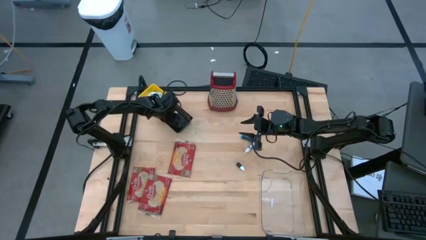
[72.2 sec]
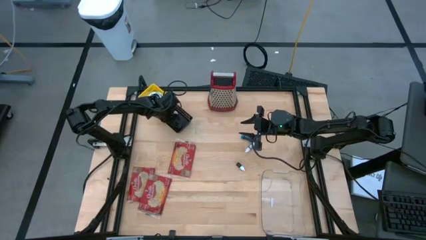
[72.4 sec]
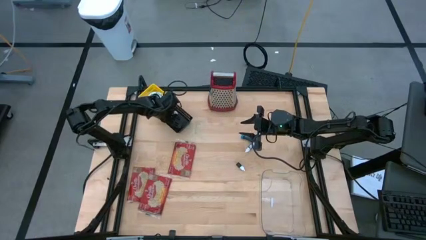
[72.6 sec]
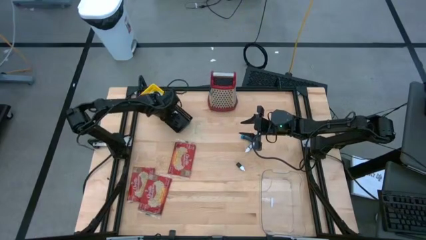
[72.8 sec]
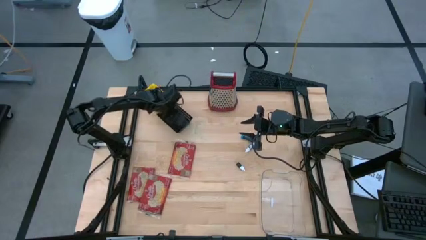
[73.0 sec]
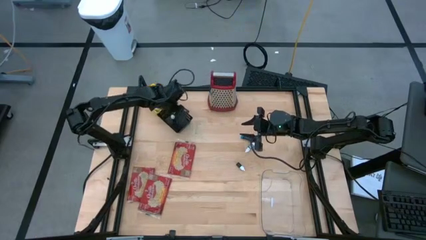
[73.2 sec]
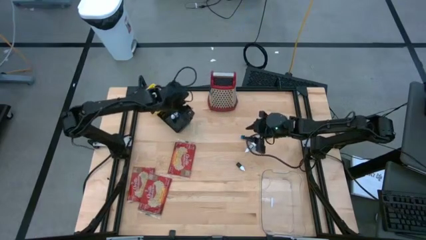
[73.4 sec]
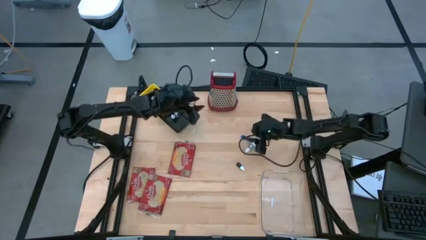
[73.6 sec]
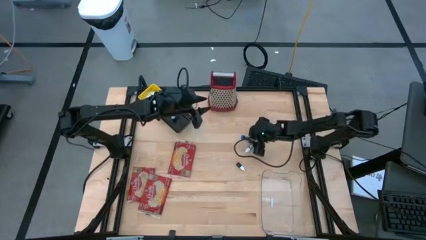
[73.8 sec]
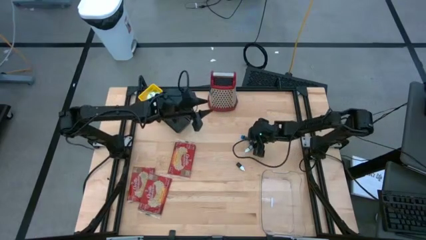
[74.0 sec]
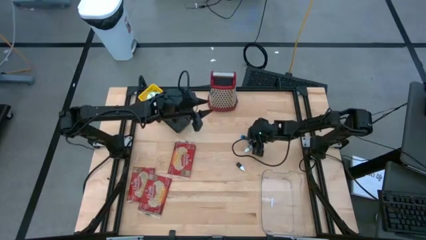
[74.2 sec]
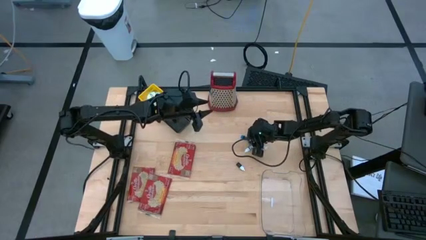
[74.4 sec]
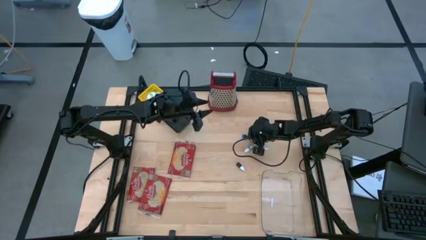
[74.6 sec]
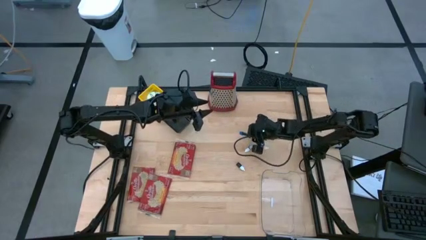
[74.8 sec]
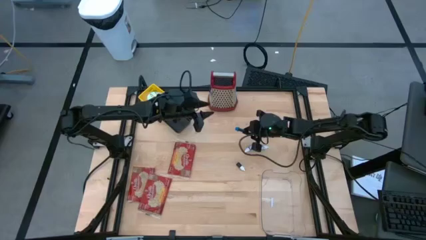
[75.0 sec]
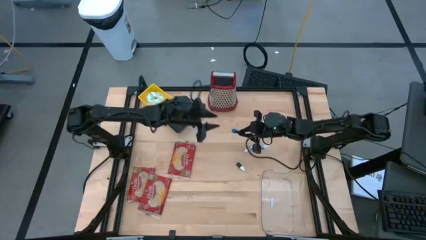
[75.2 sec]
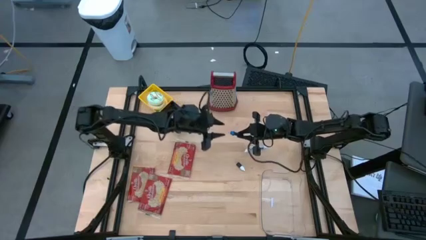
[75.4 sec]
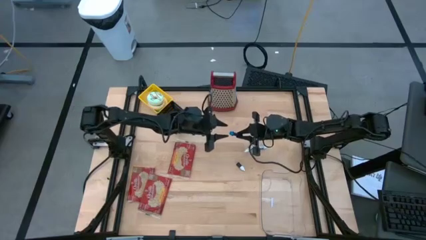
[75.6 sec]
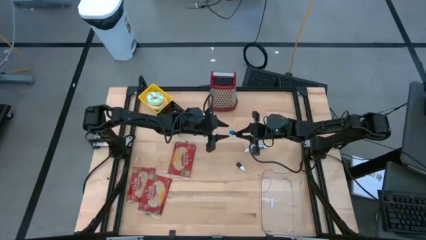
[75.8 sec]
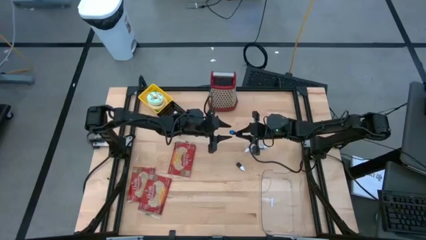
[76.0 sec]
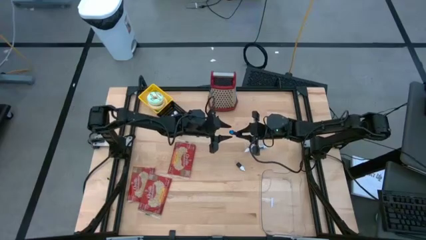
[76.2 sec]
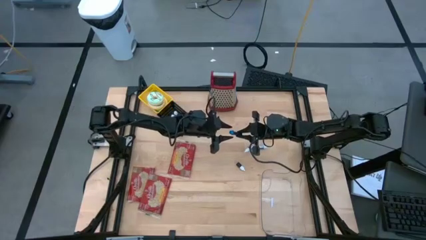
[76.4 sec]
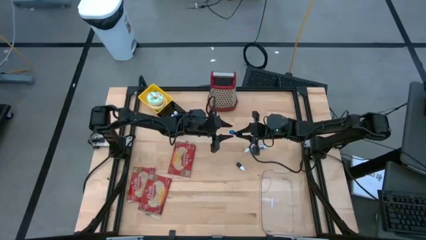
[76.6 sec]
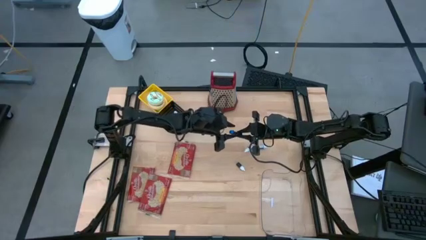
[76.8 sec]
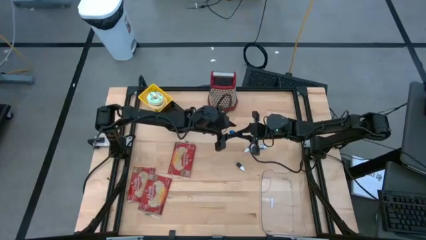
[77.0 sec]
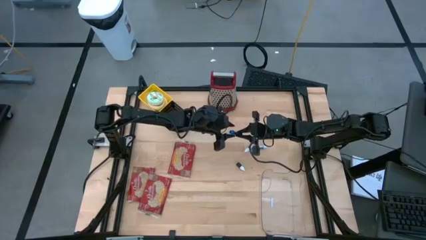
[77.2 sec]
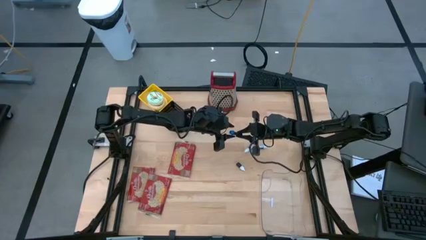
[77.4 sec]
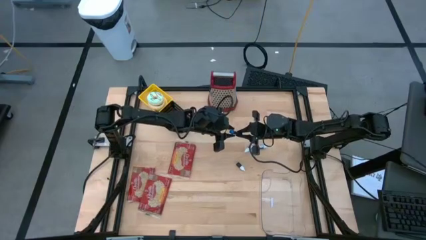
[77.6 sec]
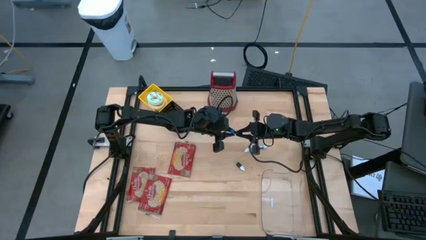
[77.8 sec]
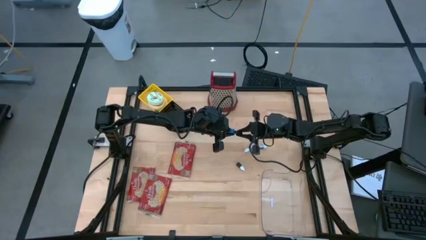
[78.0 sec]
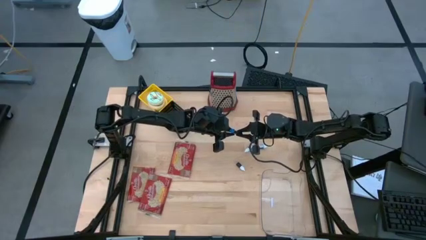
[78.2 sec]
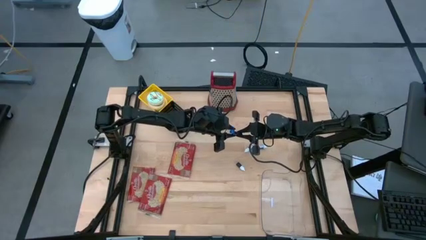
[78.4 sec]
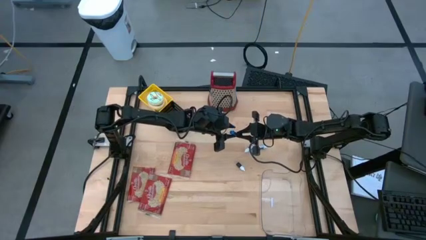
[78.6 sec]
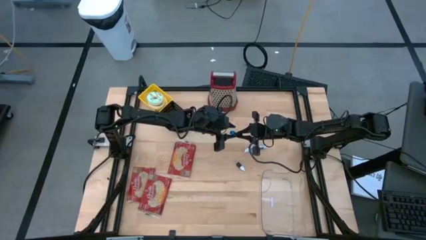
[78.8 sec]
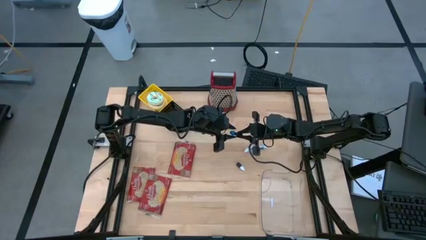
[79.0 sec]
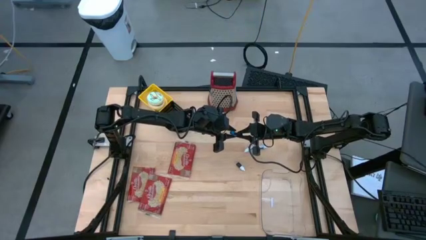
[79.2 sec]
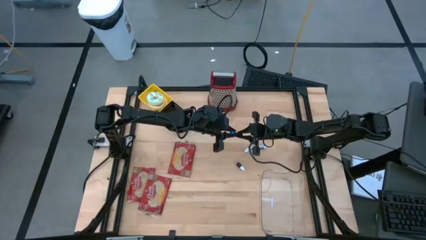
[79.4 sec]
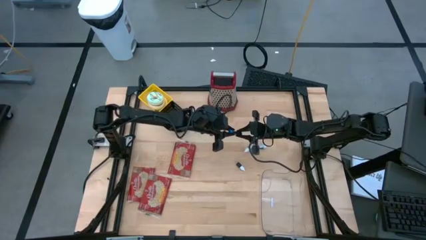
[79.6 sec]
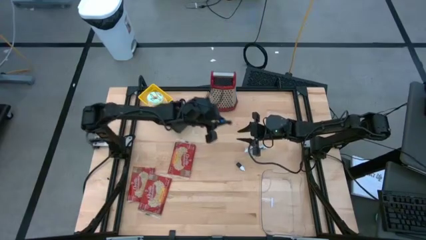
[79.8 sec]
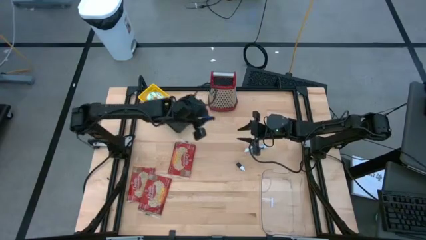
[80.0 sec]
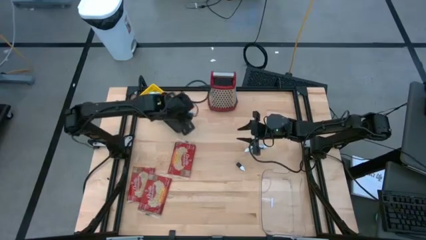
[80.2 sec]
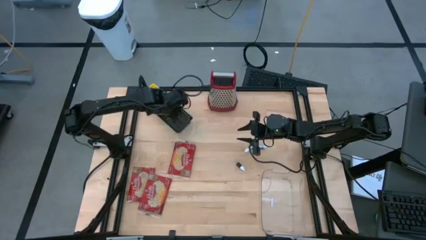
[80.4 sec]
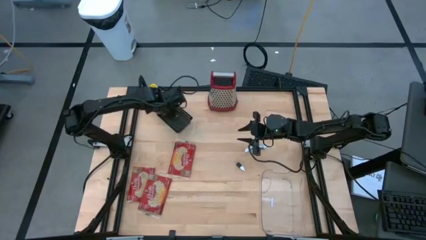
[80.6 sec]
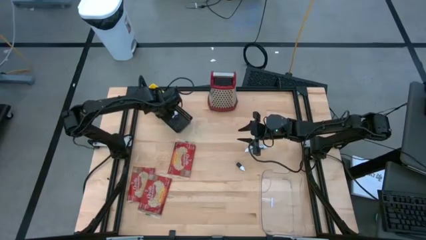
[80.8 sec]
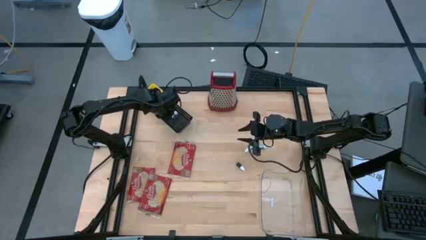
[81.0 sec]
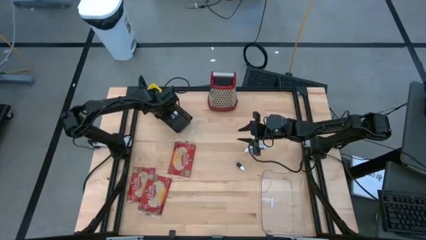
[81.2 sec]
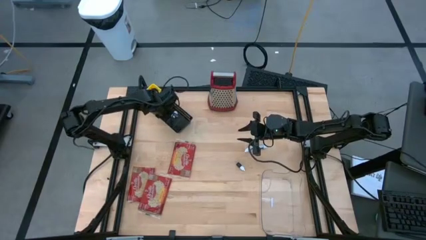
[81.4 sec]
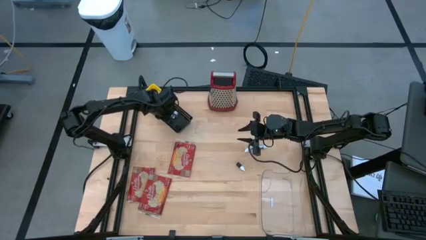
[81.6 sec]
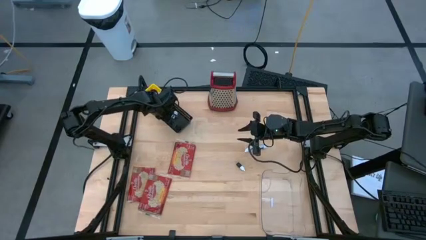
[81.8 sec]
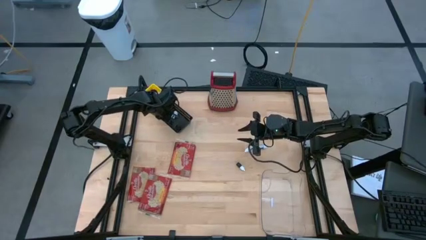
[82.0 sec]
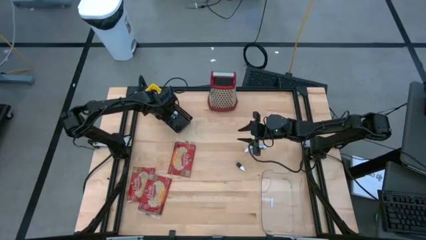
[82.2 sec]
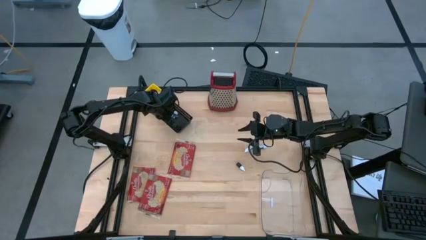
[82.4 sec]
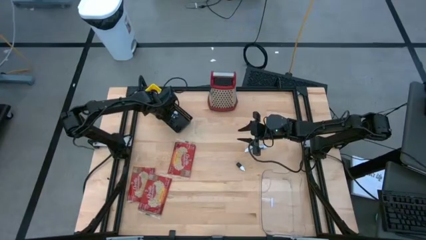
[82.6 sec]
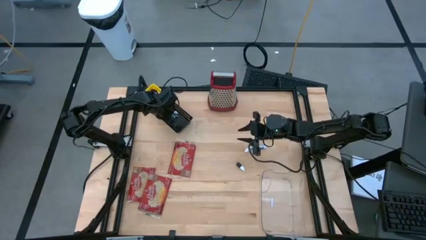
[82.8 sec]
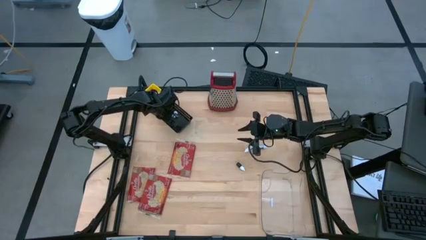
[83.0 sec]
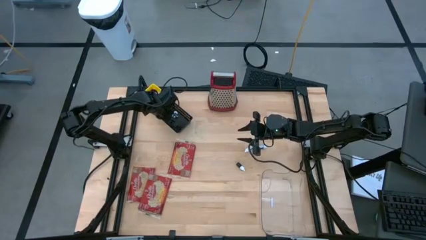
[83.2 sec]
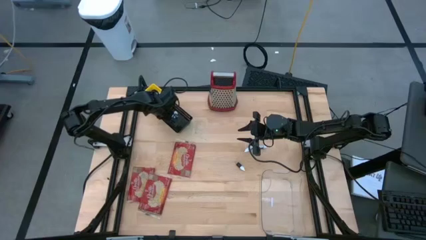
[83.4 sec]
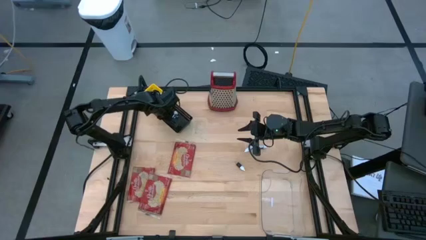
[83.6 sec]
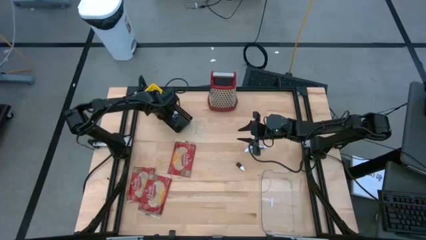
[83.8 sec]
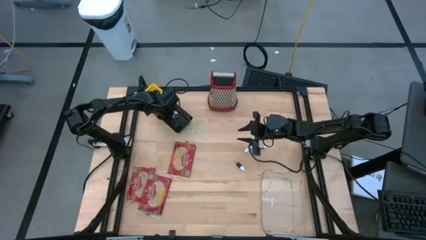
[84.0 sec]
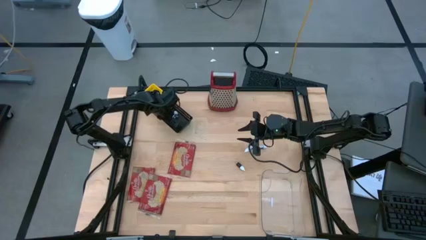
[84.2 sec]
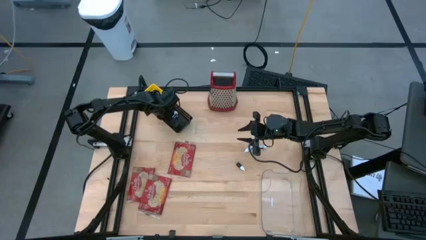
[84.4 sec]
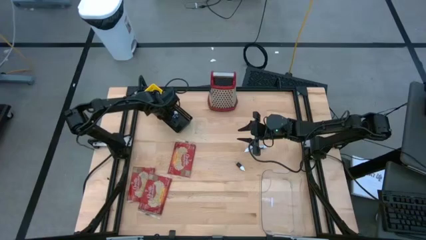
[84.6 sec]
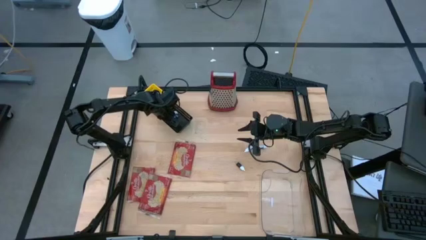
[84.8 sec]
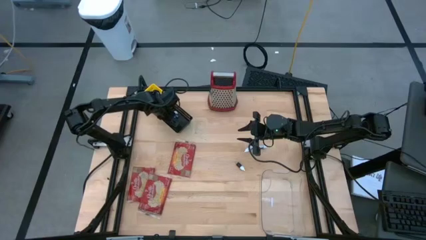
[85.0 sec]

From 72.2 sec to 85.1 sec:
Put the blue food coloring bottle into the black bin
